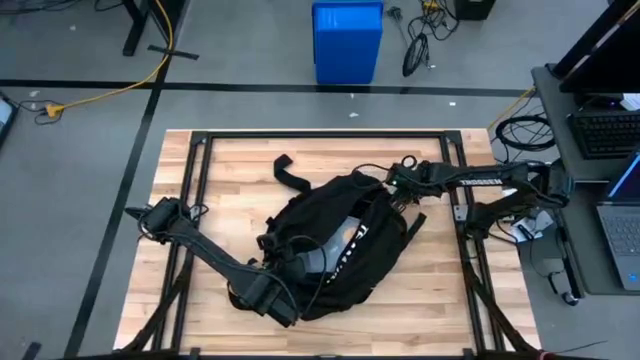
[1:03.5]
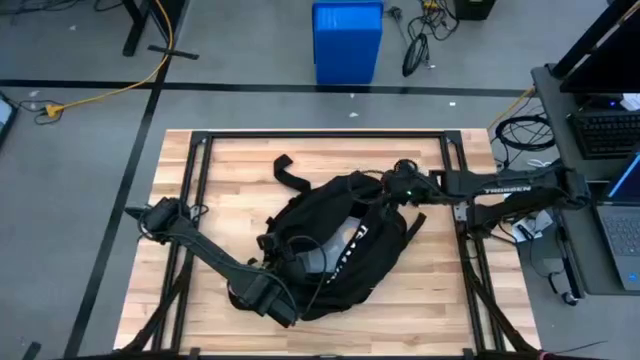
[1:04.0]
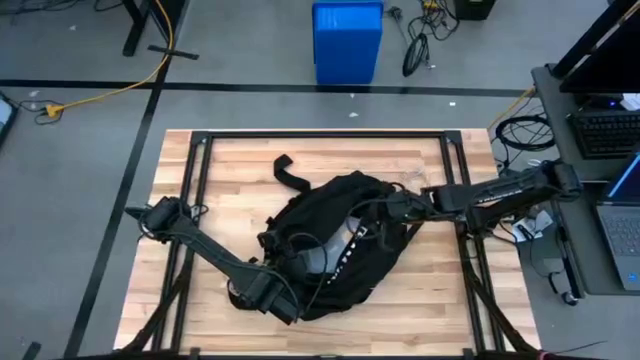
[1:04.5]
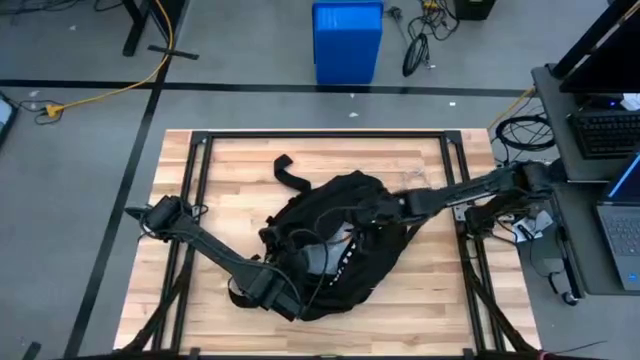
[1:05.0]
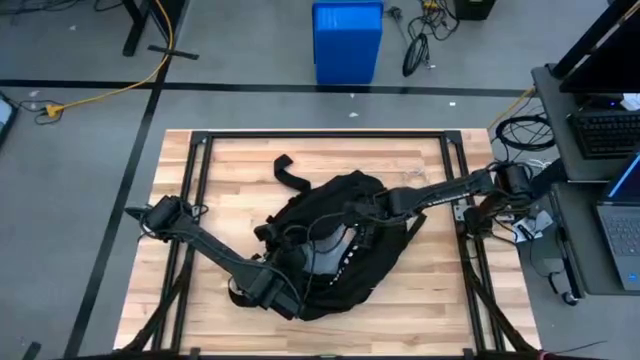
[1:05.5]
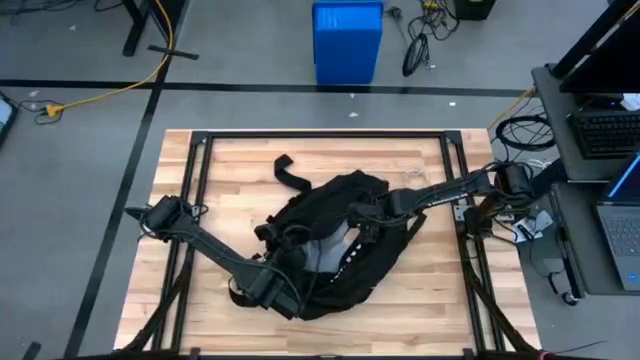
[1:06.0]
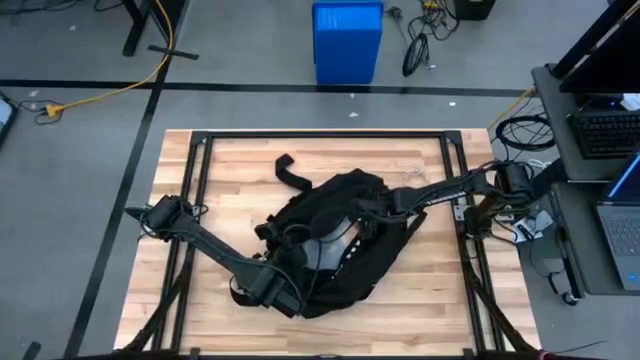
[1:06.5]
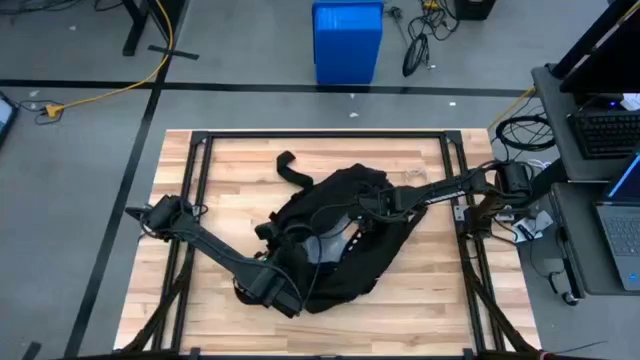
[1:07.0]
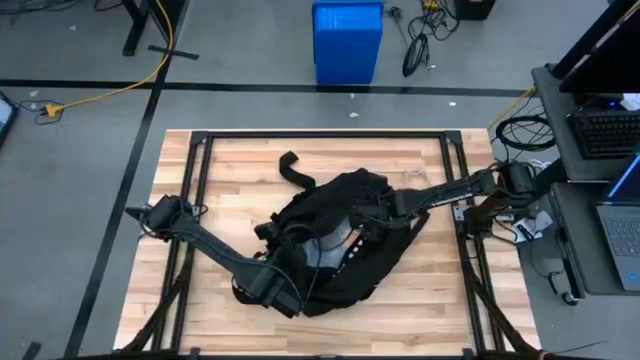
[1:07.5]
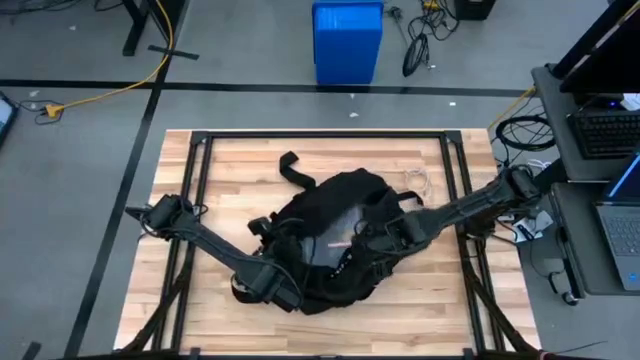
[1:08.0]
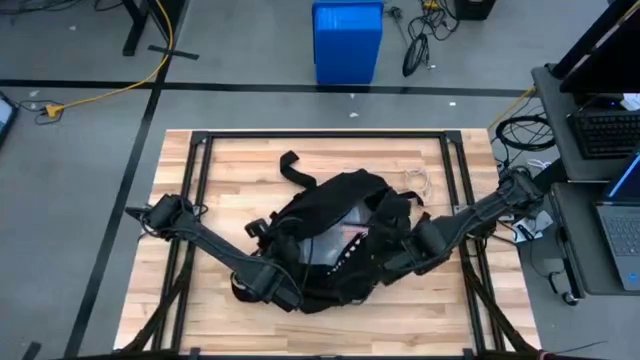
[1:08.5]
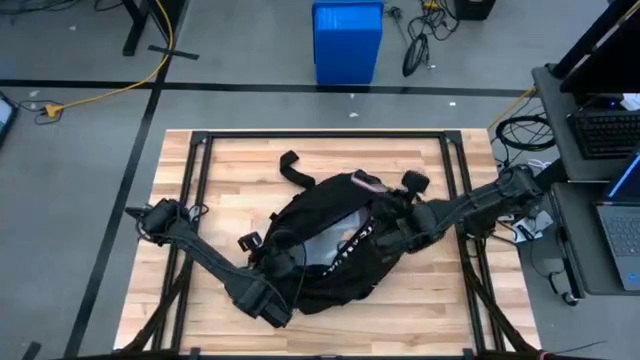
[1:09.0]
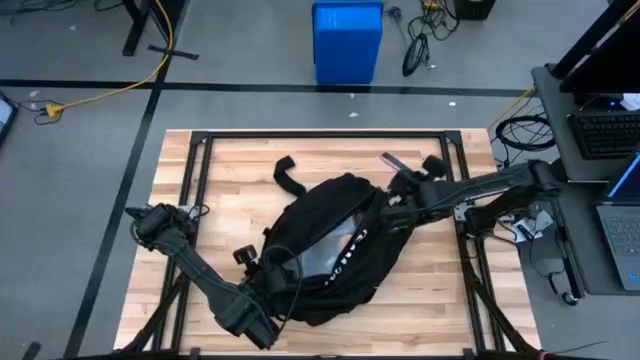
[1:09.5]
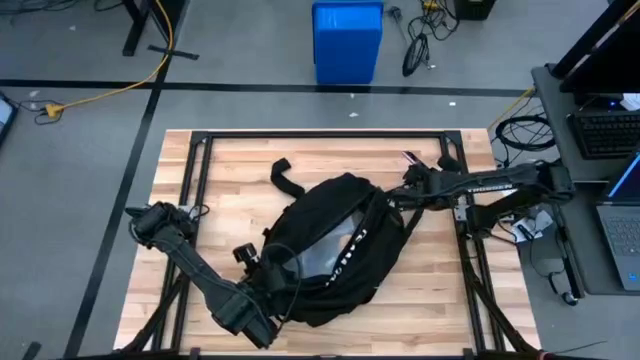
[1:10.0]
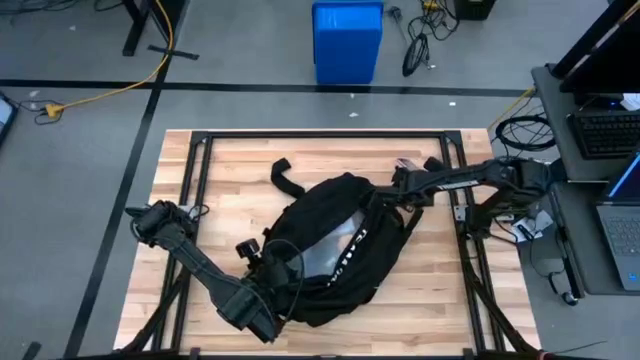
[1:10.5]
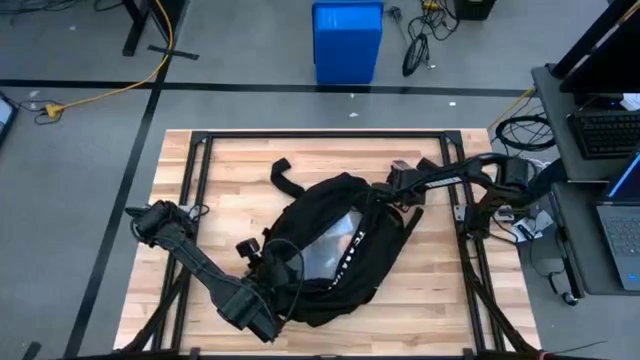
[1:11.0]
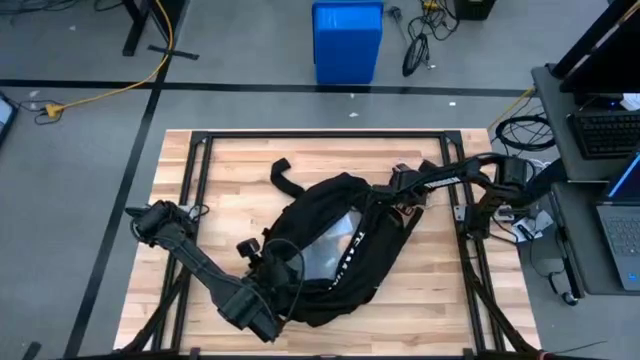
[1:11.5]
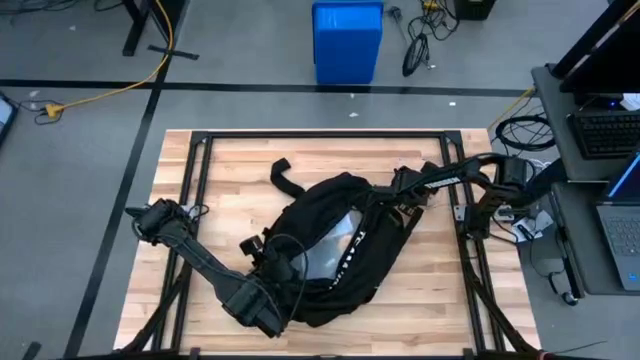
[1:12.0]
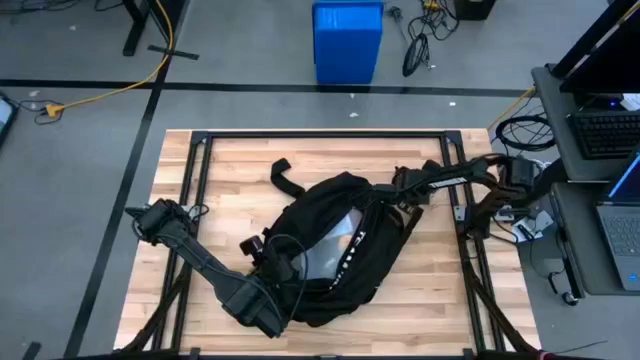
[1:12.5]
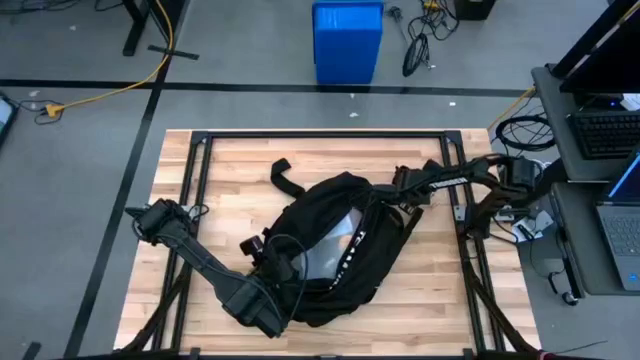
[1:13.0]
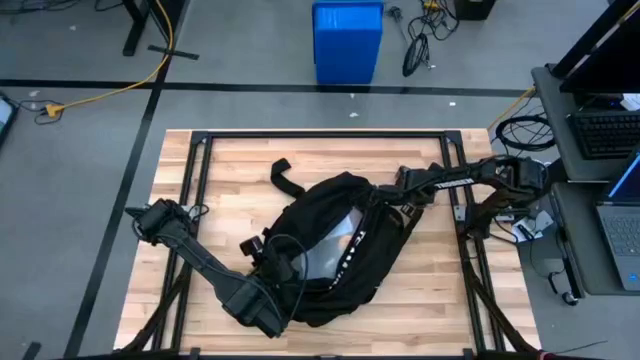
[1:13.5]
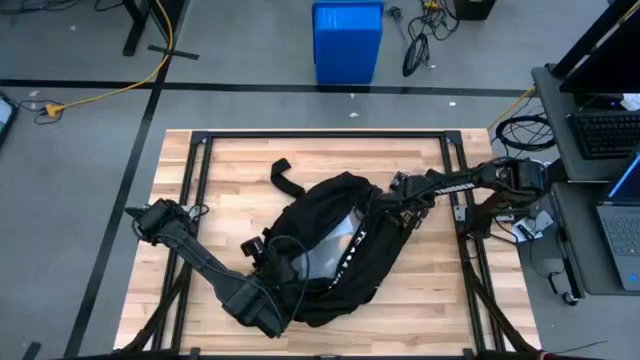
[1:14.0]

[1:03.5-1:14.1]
Task: Unpack backpack
Remove the cellphone from the black backpack

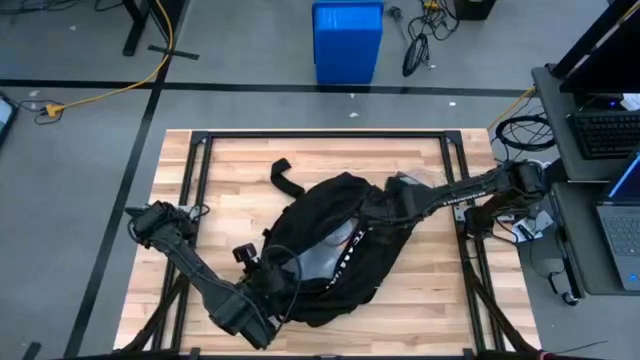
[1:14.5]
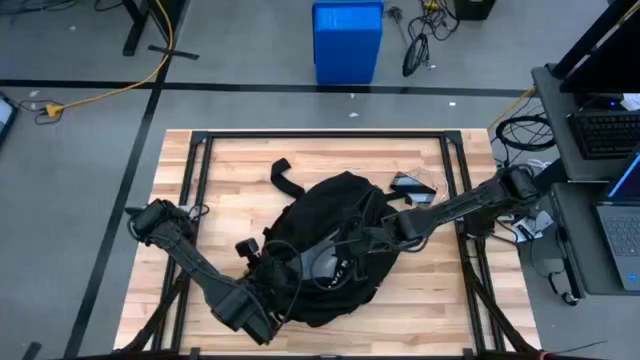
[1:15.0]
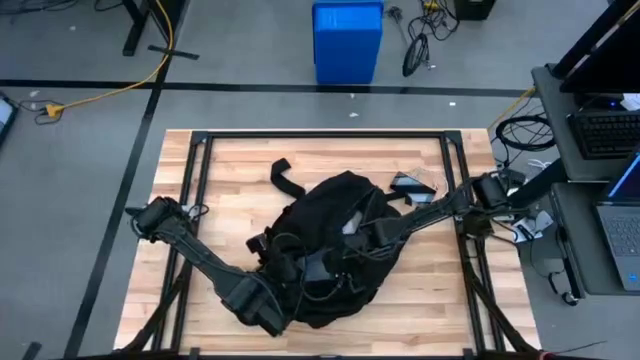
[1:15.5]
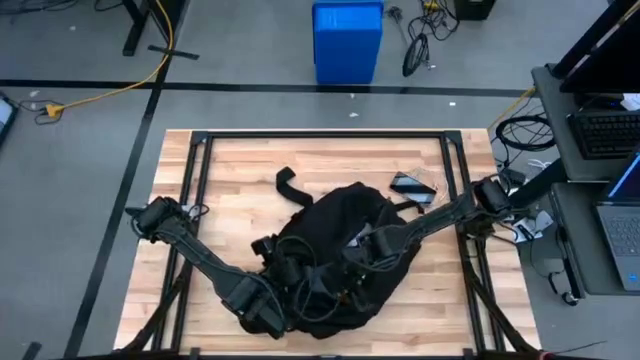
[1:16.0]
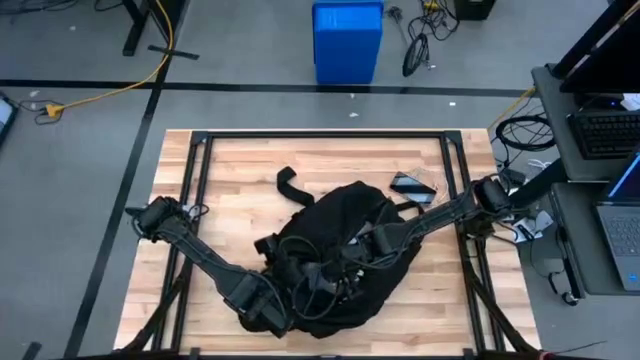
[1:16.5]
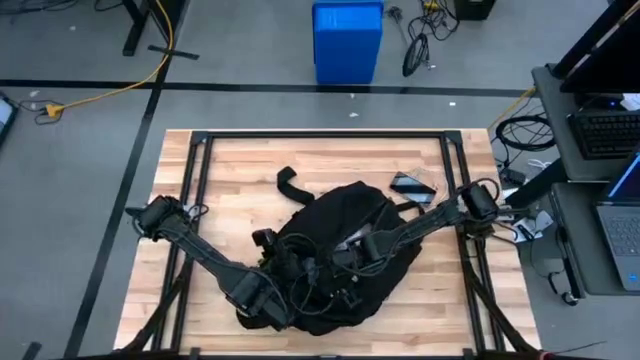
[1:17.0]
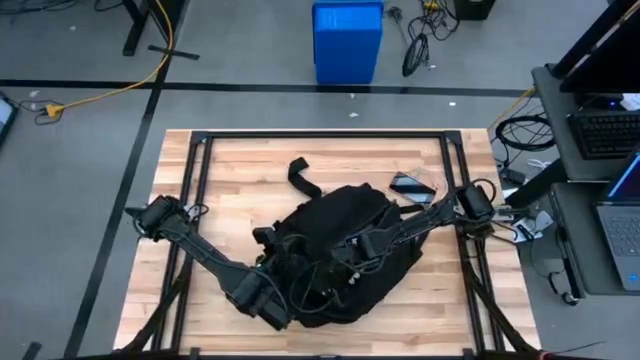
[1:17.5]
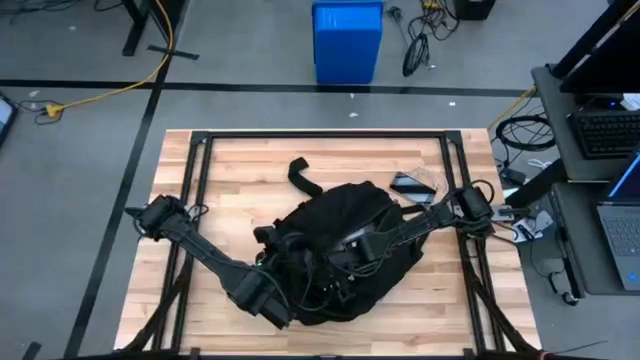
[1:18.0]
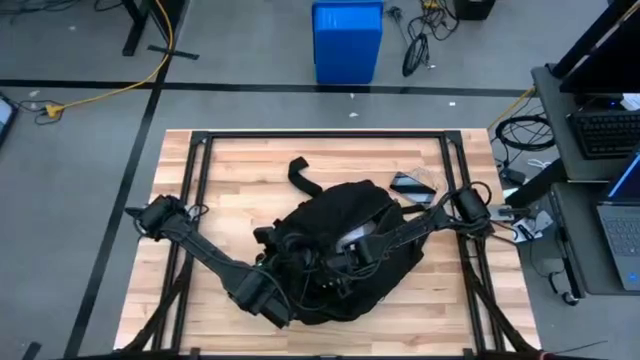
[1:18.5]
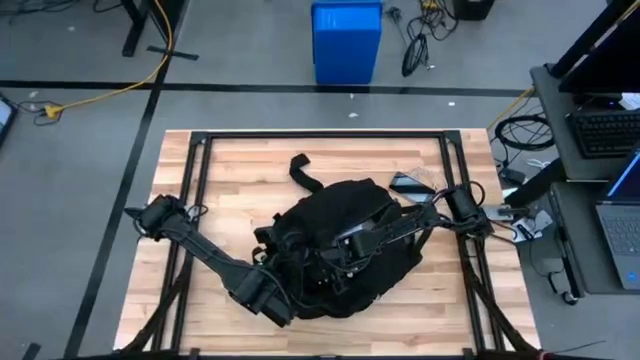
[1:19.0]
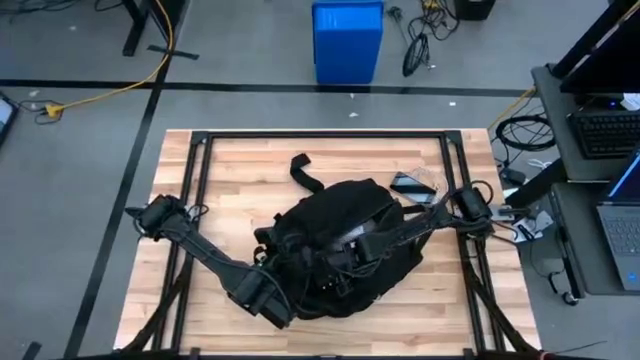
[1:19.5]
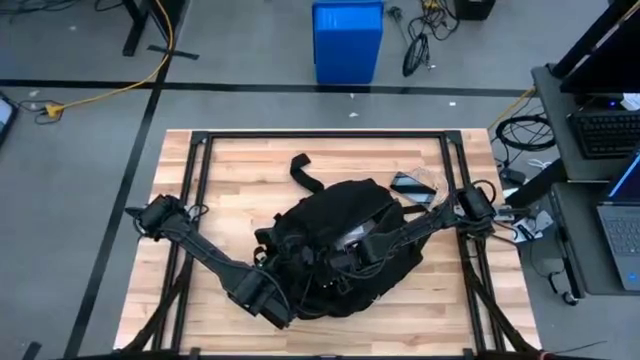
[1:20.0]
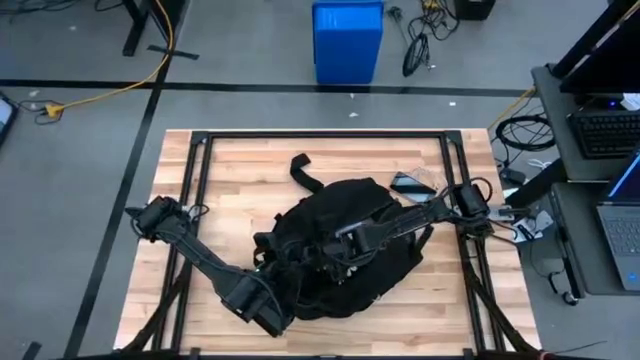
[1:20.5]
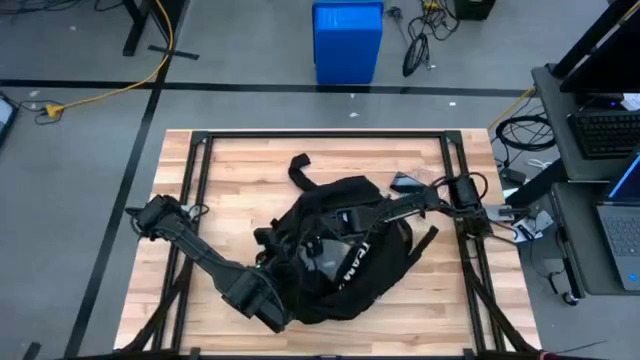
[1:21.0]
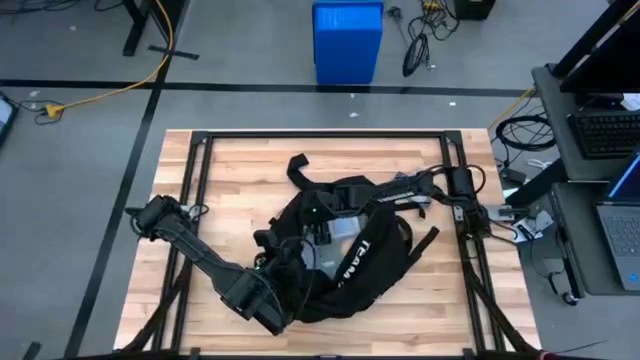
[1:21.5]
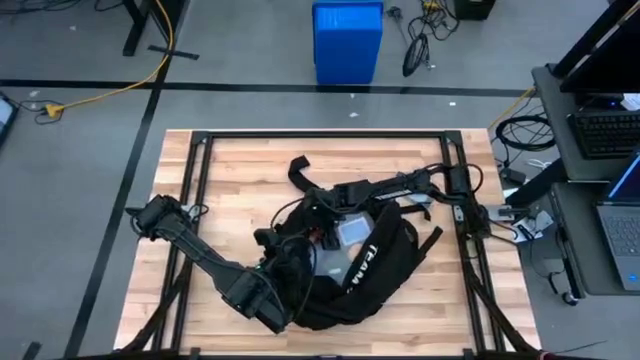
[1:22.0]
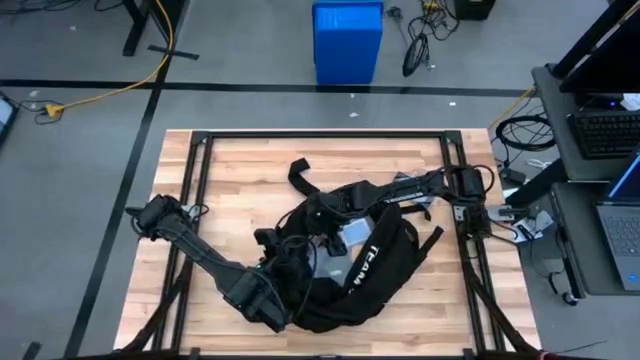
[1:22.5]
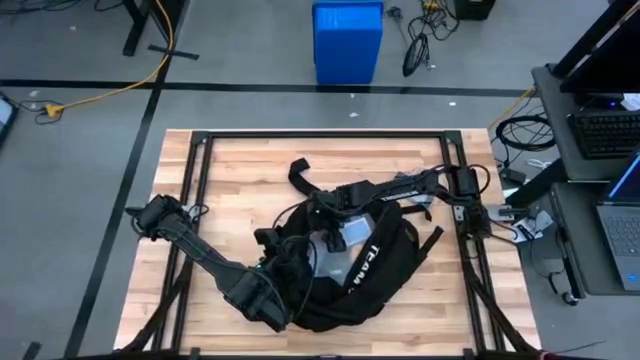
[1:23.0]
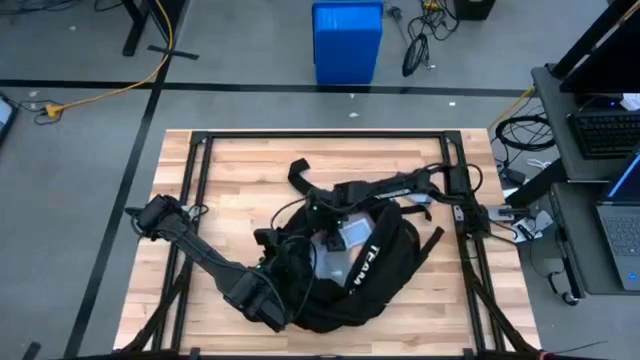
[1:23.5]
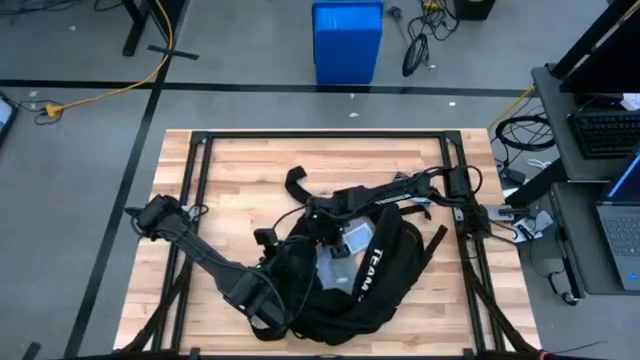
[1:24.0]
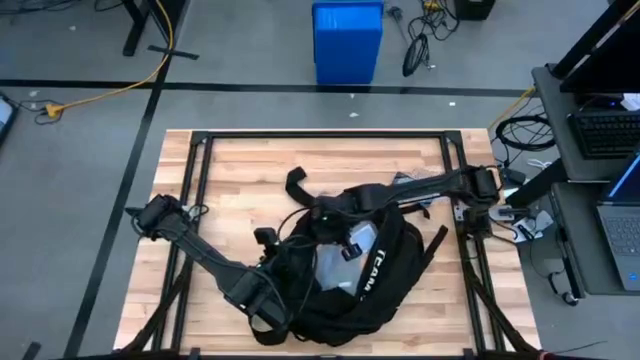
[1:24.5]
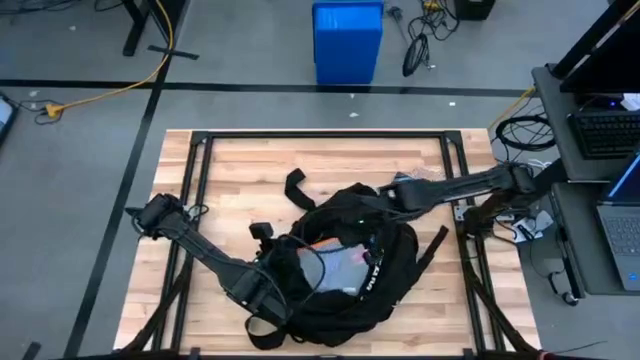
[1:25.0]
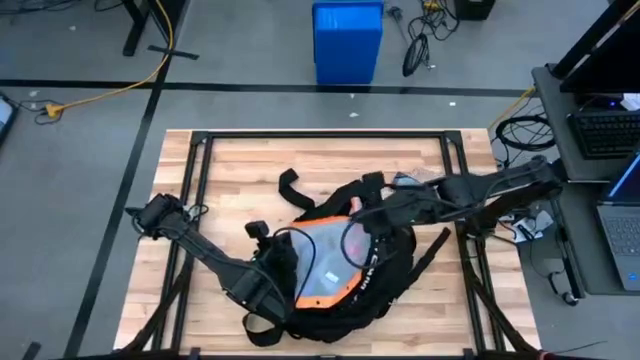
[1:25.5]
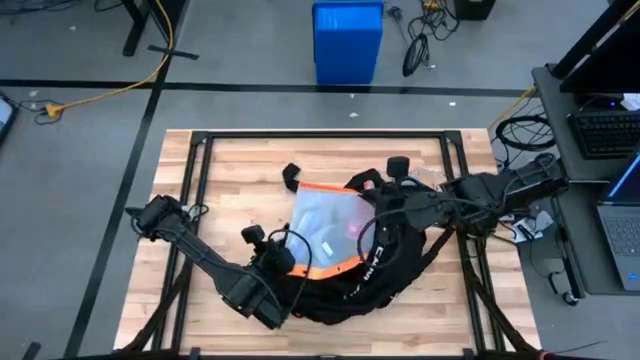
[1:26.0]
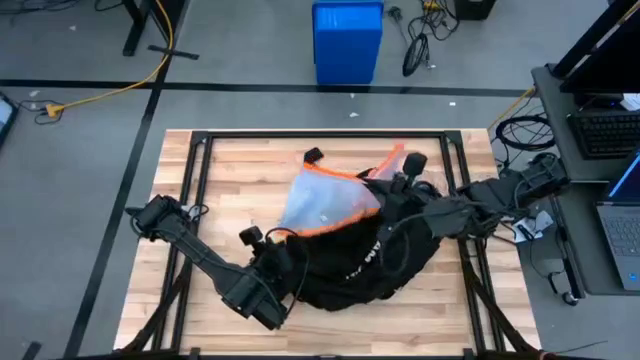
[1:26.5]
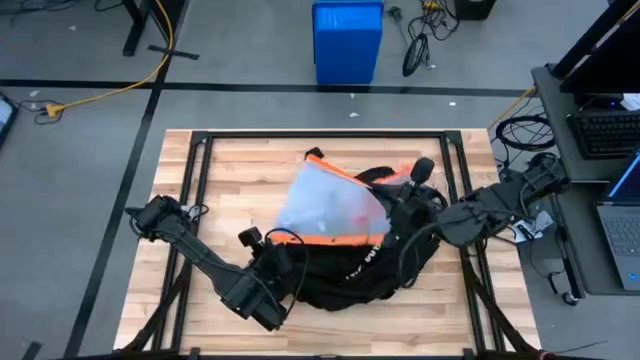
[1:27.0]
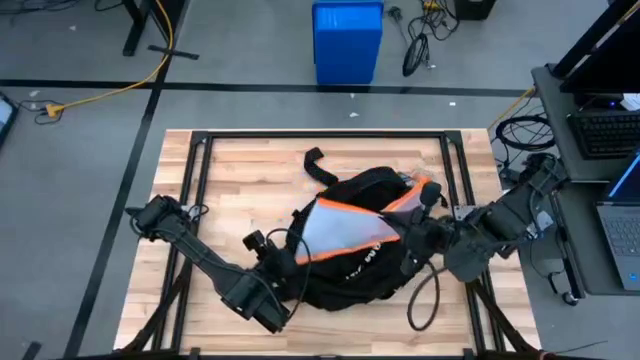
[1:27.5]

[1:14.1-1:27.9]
Remove the zip bag from the black backpack
